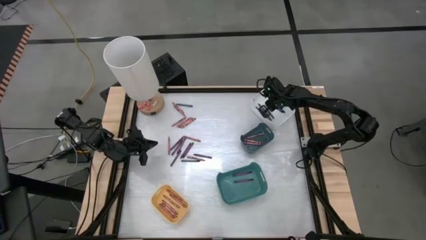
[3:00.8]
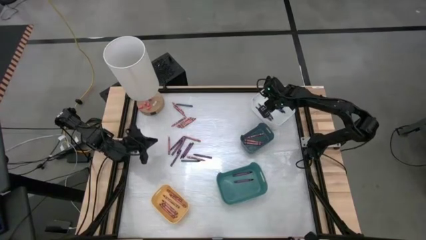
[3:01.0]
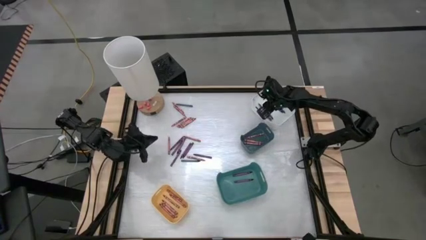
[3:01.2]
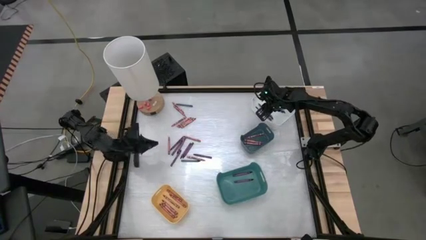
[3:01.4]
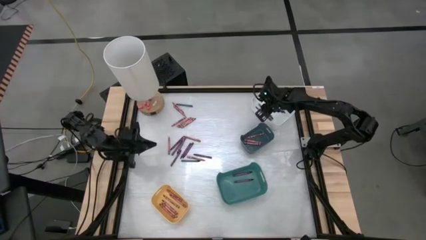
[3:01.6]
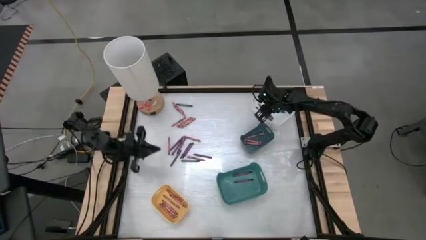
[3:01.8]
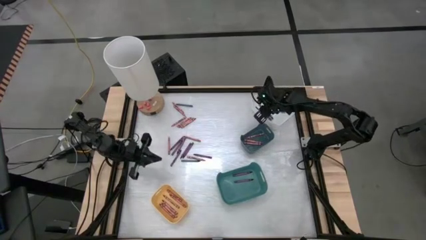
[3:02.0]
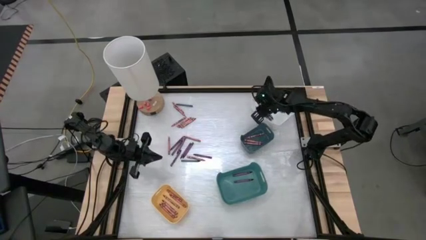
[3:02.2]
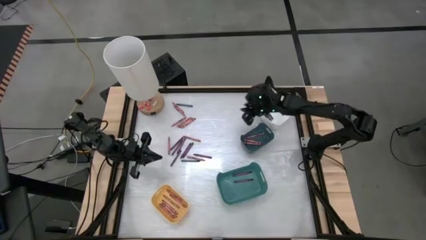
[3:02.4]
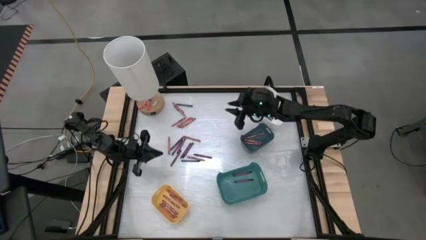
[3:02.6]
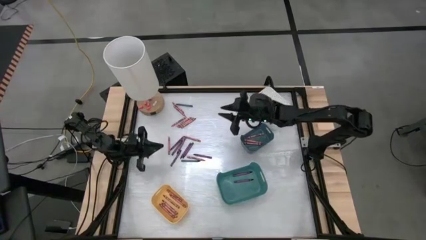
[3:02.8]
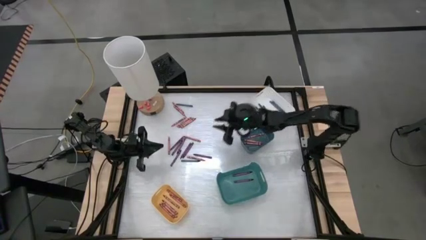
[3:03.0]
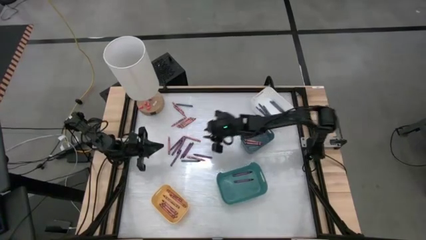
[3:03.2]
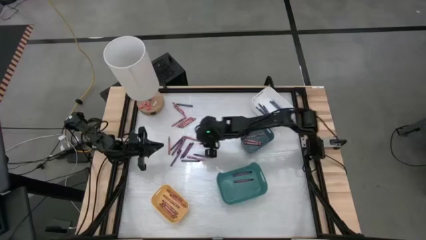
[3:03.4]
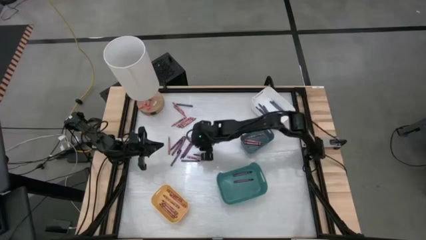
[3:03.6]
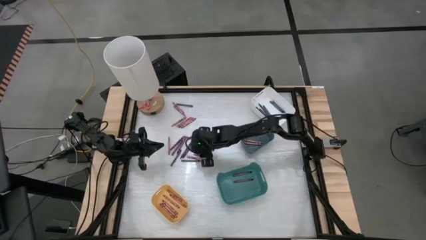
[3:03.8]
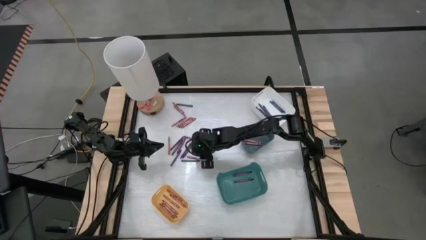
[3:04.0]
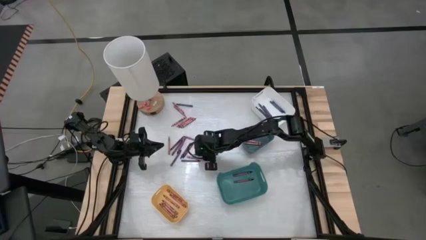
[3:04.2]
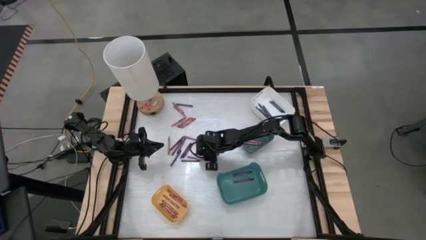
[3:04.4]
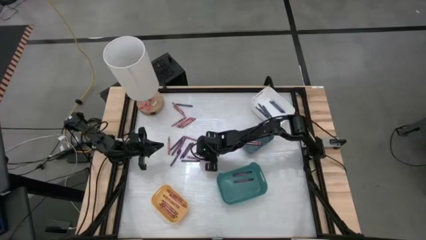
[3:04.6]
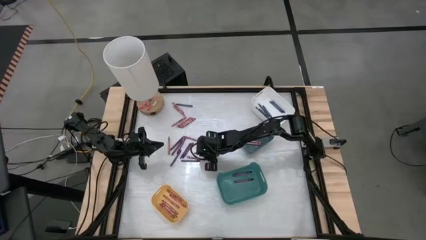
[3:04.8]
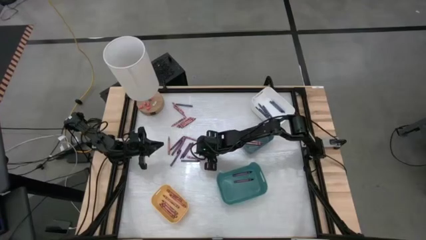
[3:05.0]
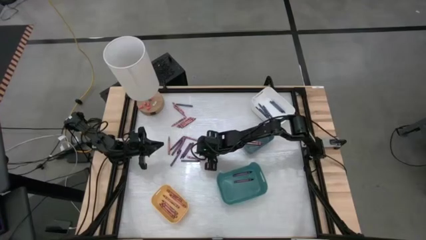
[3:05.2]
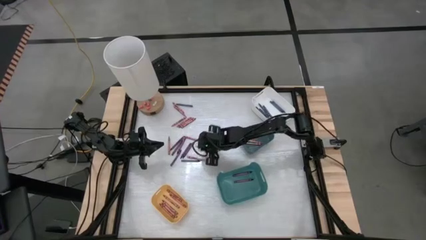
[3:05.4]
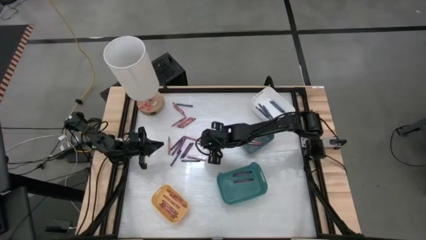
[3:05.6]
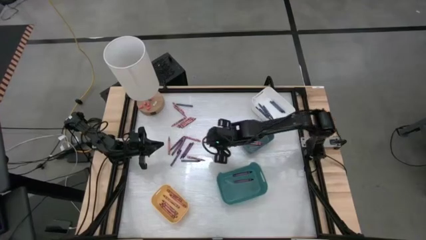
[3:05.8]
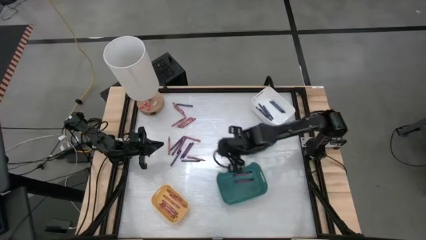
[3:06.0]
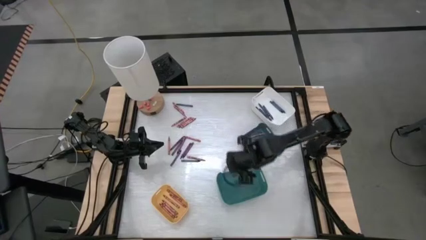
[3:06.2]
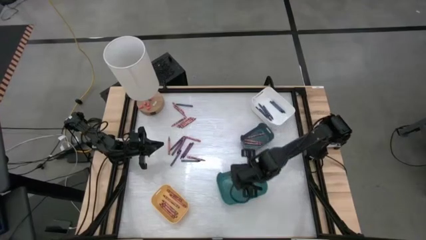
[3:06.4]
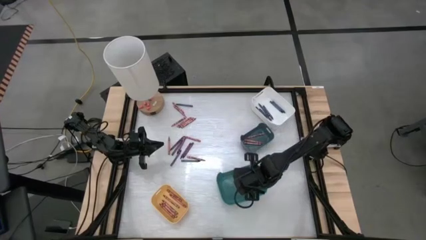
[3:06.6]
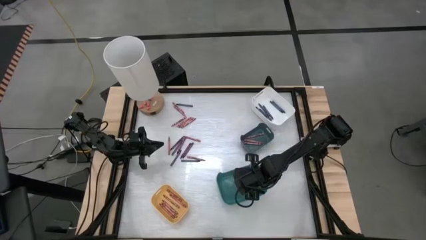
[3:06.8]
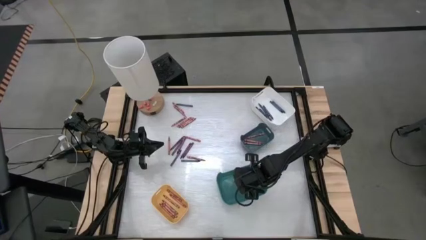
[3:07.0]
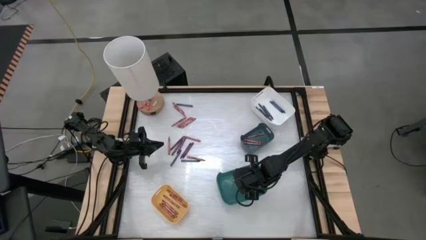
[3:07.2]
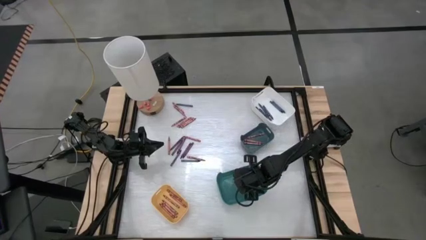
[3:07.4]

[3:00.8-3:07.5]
Task: Sort crayons
Put the purple crayon into the blue bin

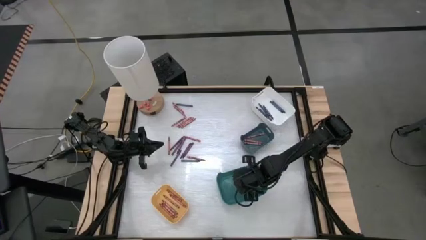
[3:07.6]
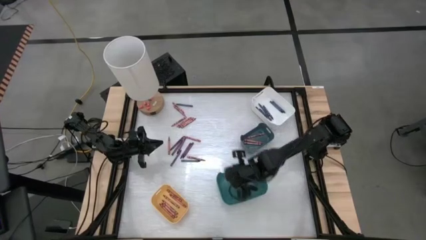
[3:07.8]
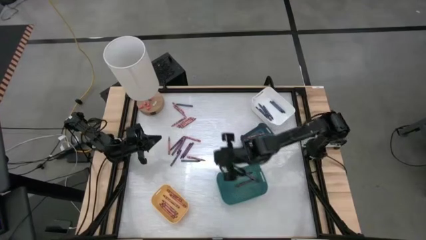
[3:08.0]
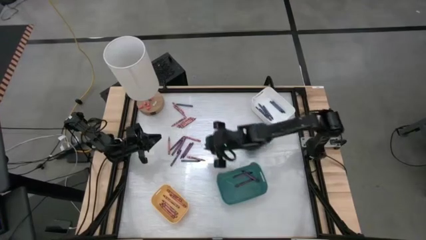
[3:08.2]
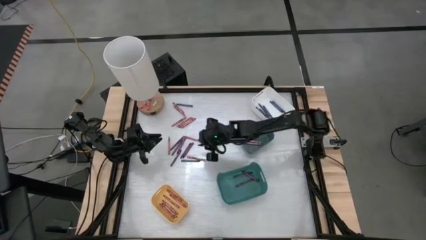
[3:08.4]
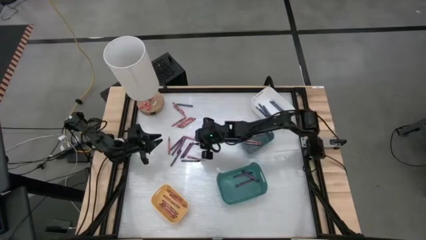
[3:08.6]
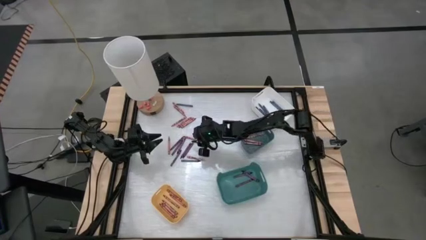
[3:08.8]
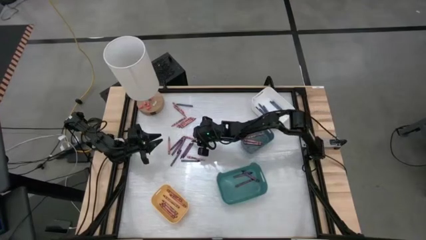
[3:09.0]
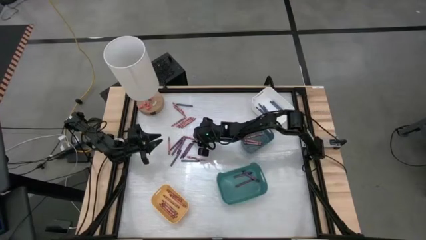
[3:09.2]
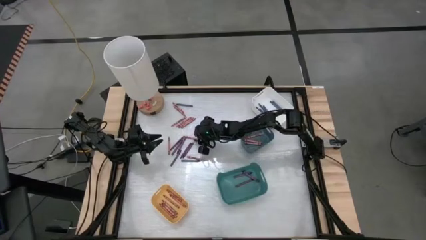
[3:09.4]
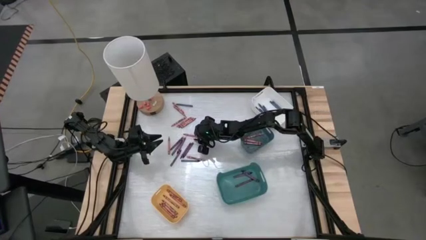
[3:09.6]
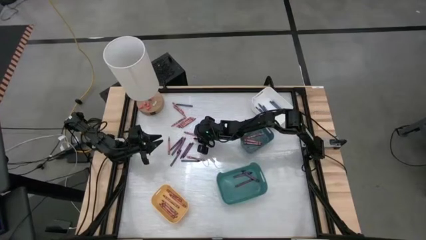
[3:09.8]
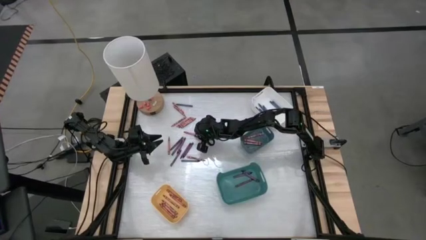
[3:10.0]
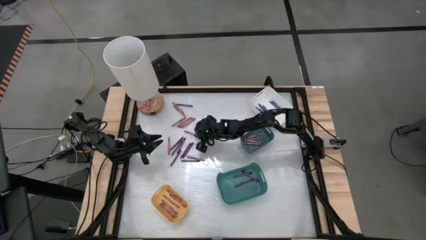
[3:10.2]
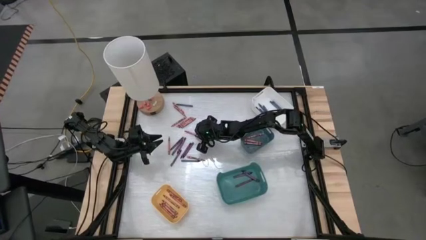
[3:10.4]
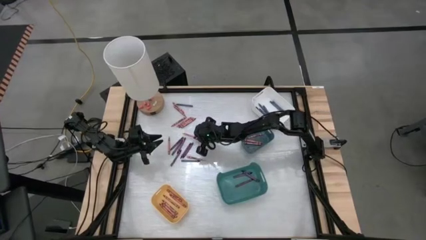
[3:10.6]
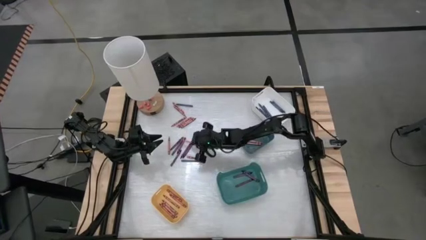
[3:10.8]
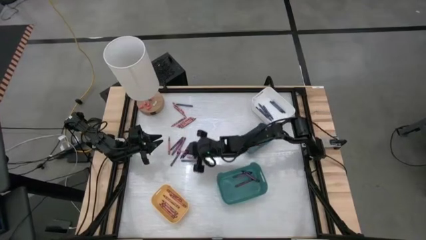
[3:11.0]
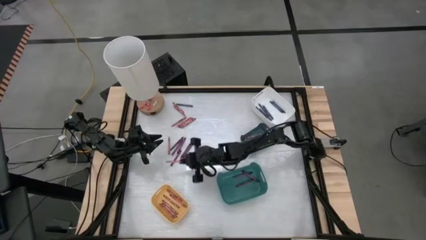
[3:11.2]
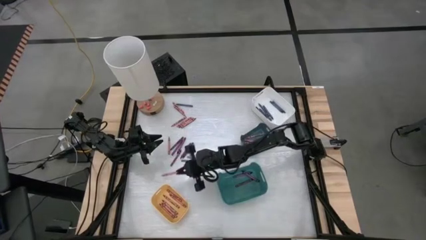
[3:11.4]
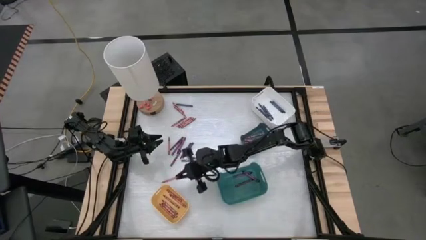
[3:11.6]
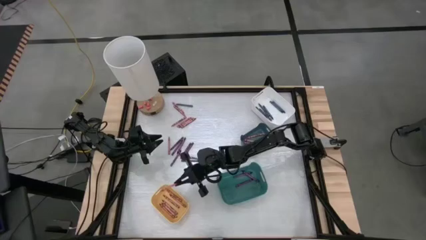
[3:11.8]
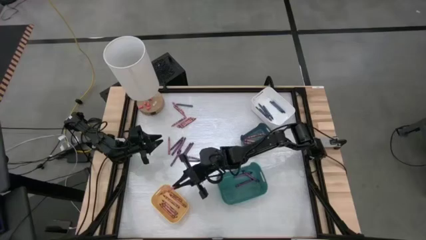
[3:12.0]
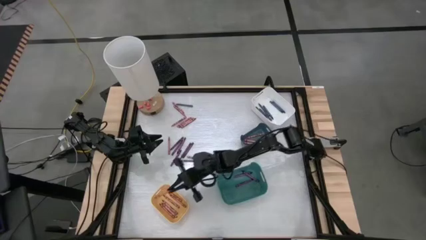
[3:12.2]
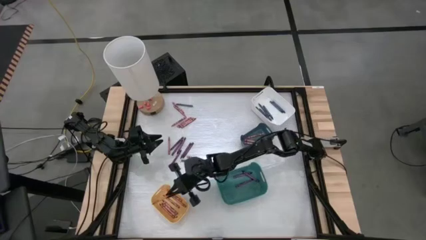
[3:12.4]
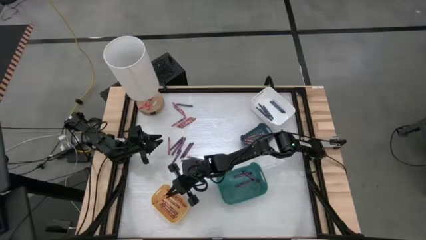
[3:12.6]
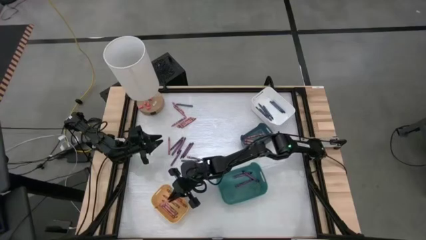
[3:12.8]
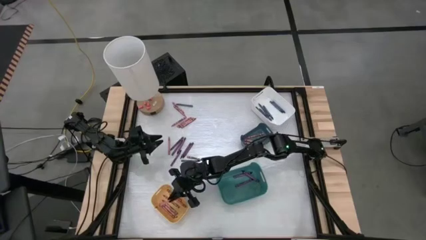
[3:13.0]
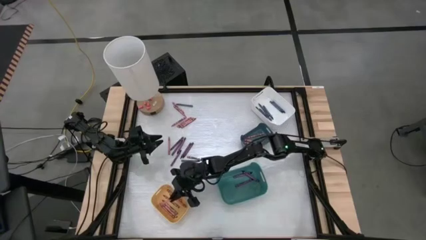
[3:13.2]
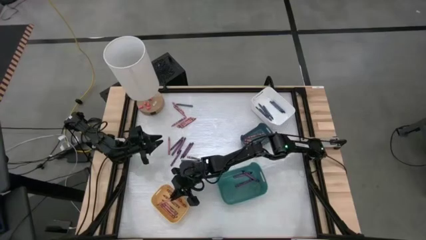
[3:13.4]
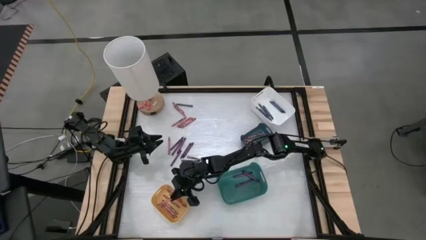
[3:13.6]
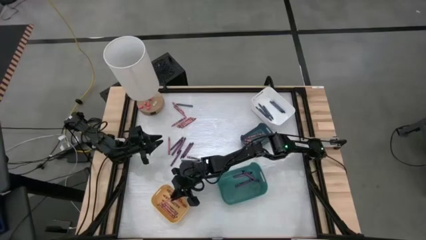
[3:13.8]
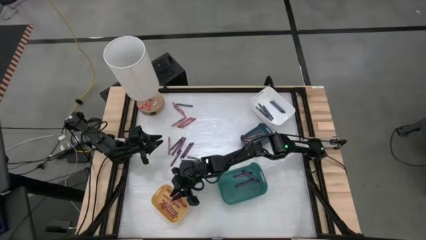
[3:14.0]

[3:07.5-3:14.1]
Put the red crayon into the yellow bin

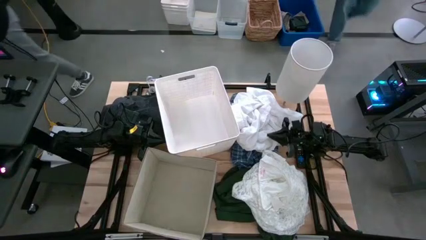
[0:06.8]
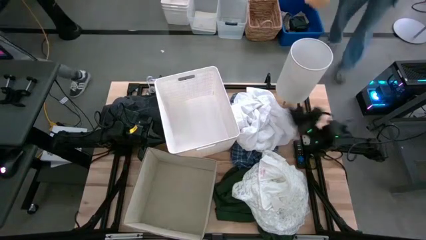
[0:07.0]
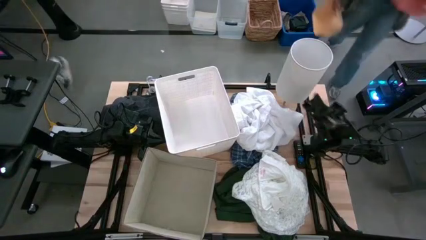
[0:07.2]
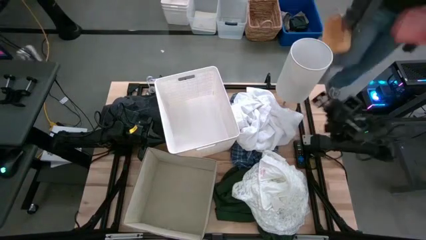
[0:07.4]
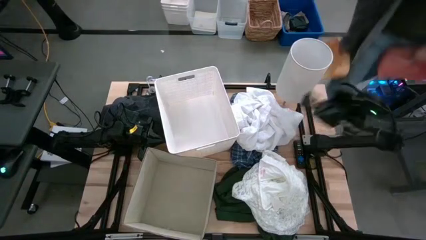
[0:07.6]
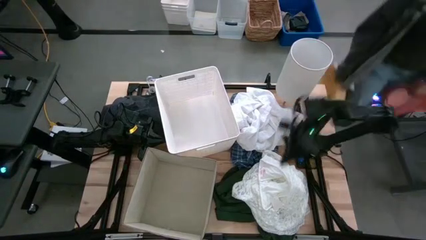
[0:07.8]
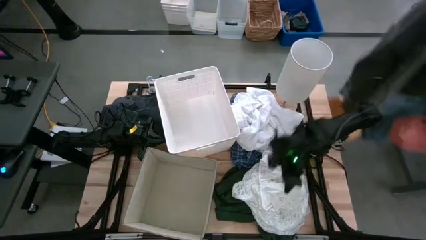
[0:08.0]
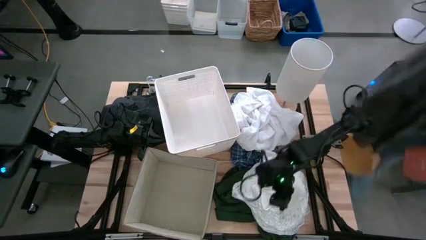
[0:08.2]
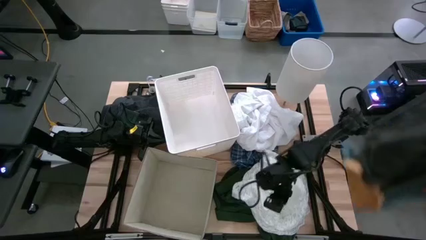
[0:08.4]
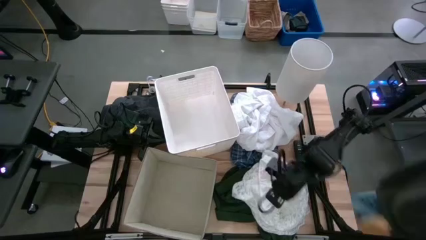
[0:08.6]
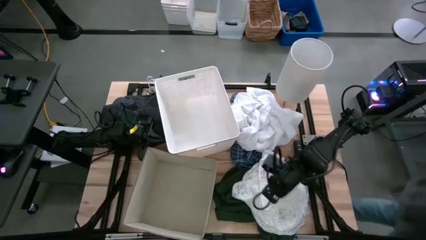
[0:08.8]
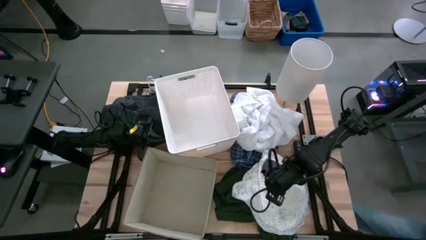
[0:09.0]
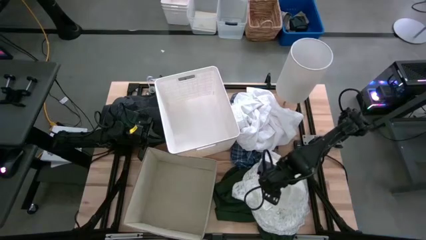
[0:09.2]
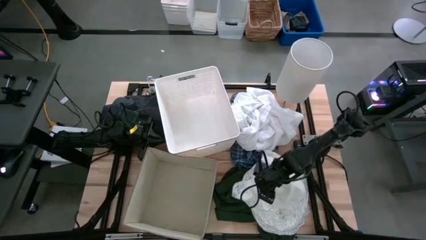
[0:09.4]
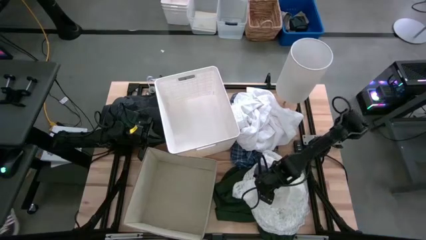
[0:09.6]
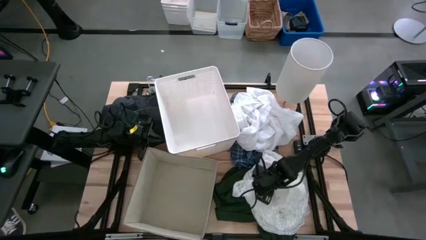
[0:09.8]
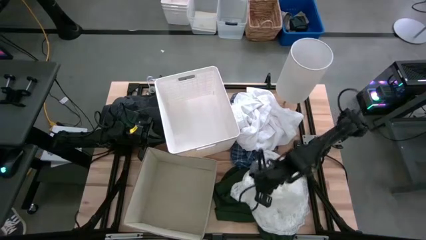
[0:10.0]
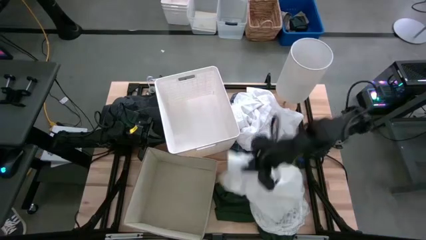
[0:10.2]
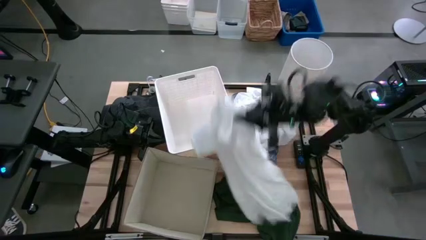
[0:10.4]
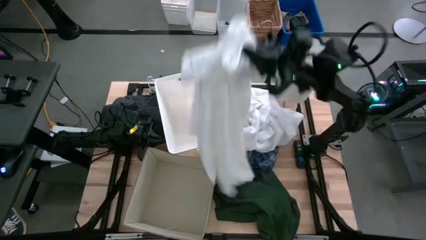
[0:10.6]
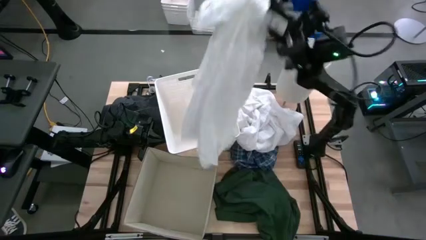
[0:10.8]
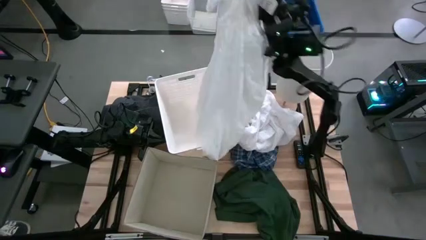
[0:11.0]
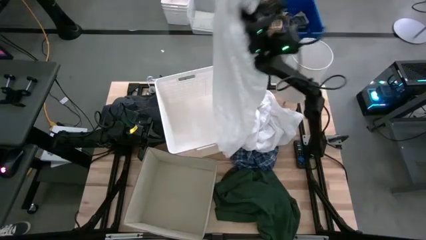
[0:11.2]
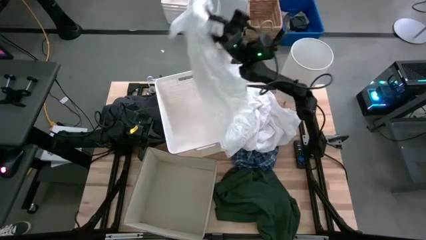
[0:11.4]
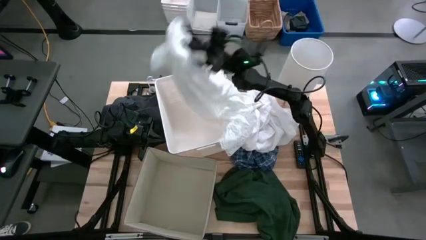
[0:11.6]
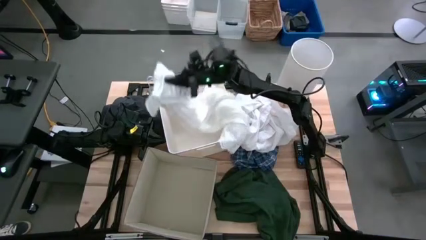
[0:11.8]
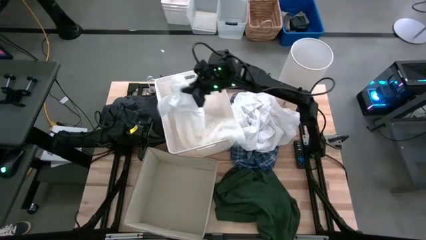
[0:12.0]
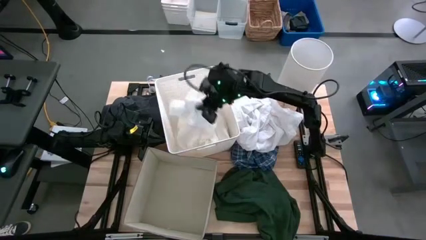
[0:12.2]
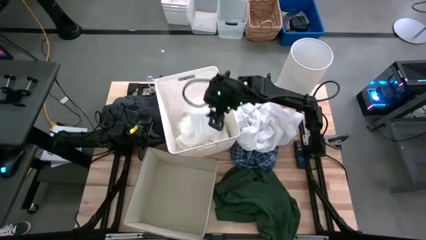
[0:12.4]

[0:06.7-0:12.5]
Task: Sort clothes
Put the white dress into the white bin
